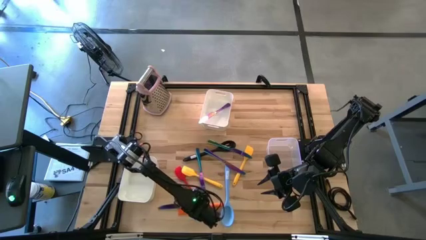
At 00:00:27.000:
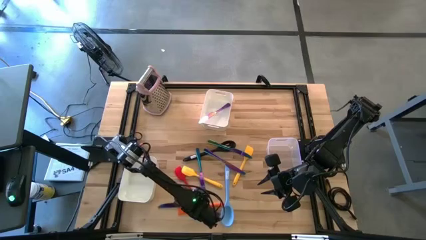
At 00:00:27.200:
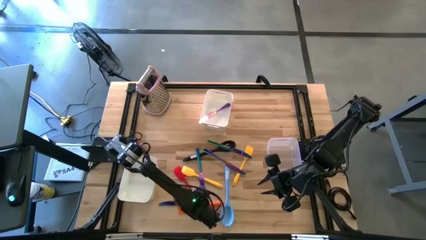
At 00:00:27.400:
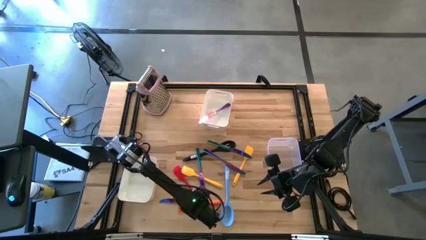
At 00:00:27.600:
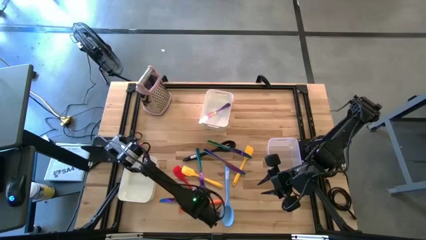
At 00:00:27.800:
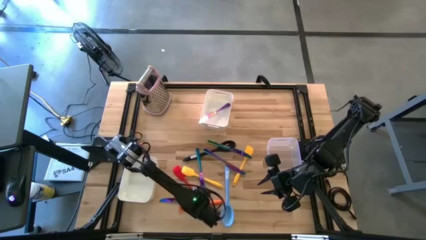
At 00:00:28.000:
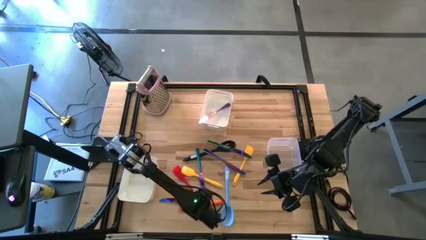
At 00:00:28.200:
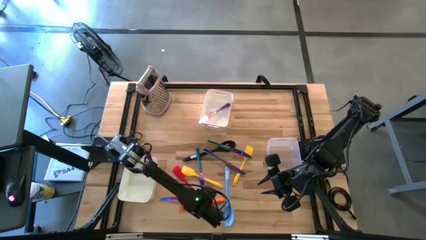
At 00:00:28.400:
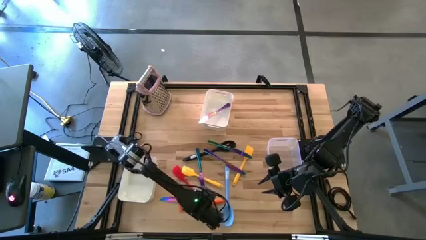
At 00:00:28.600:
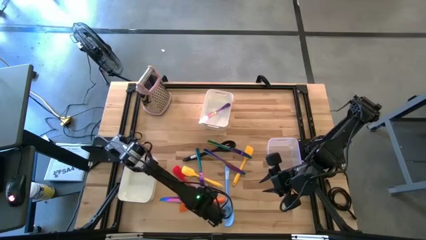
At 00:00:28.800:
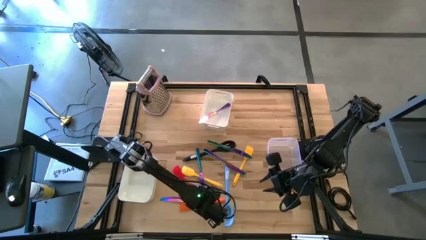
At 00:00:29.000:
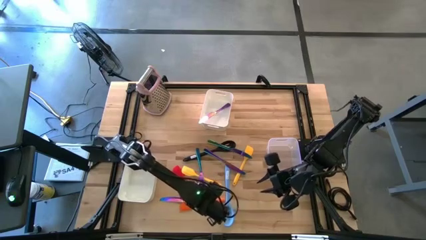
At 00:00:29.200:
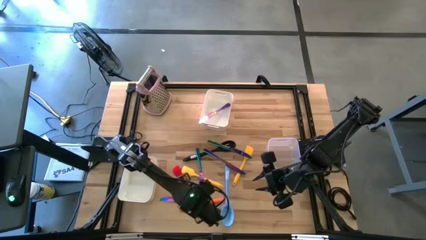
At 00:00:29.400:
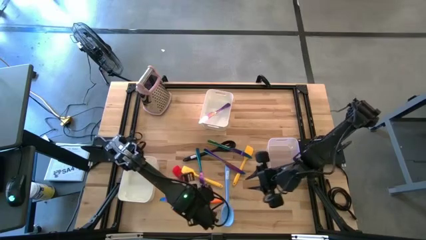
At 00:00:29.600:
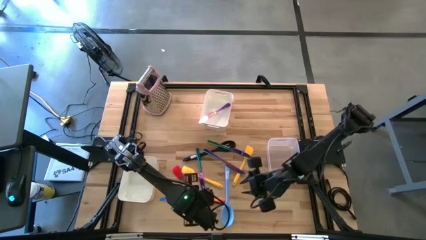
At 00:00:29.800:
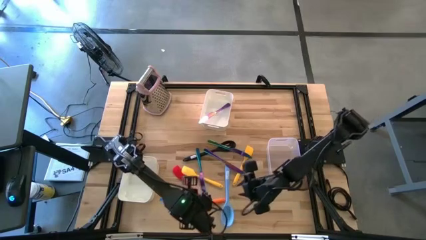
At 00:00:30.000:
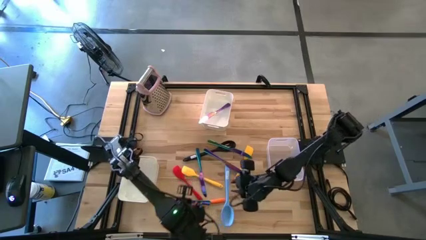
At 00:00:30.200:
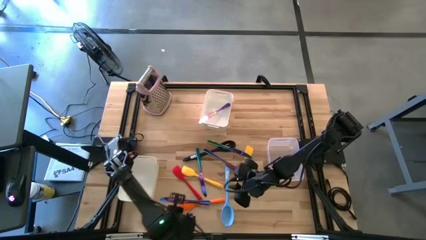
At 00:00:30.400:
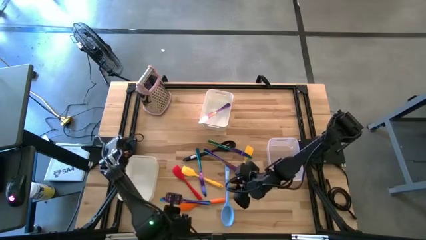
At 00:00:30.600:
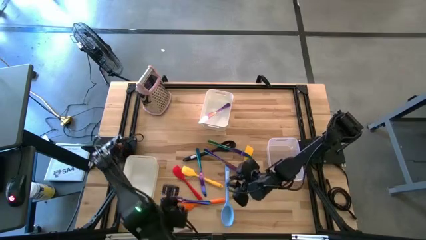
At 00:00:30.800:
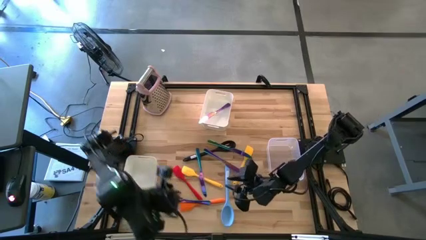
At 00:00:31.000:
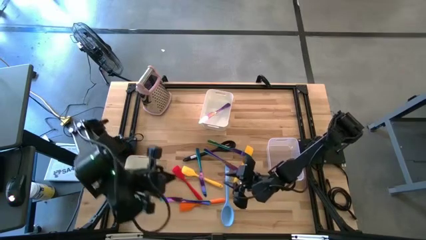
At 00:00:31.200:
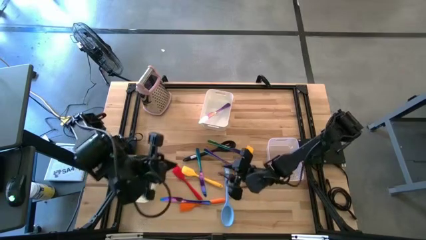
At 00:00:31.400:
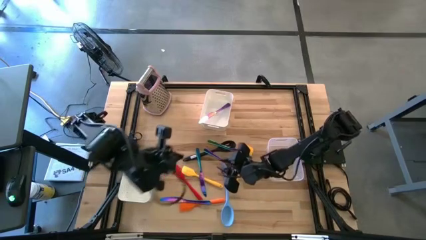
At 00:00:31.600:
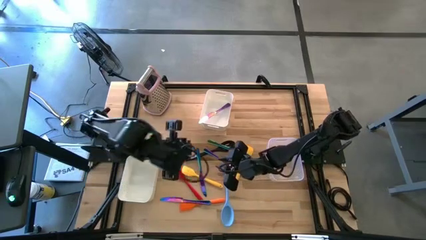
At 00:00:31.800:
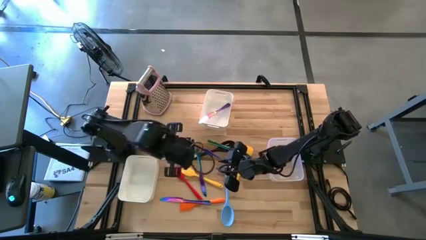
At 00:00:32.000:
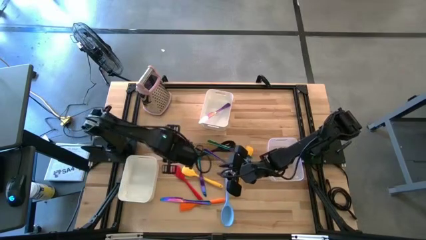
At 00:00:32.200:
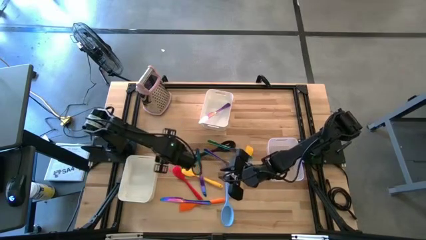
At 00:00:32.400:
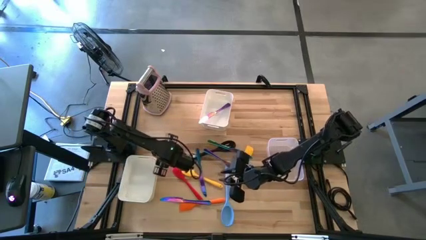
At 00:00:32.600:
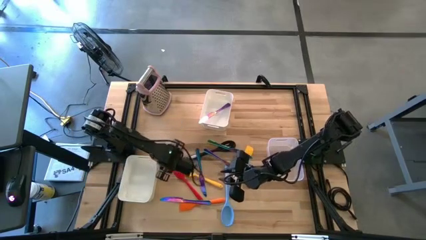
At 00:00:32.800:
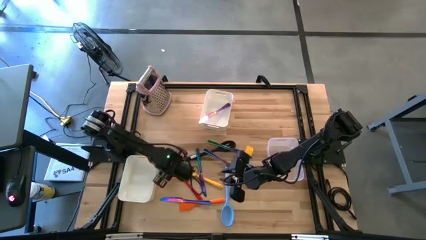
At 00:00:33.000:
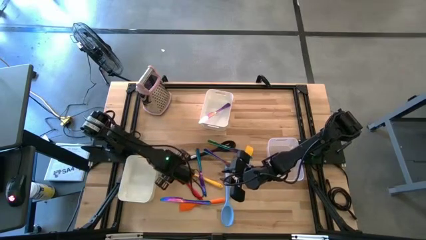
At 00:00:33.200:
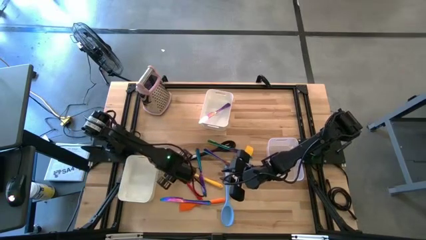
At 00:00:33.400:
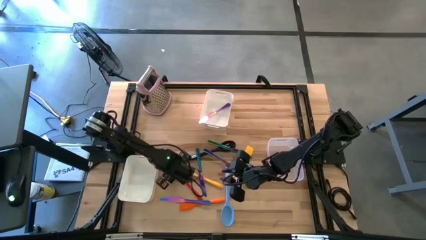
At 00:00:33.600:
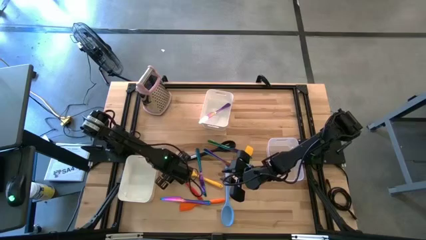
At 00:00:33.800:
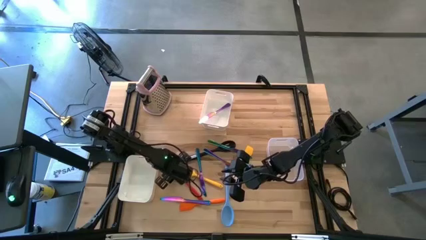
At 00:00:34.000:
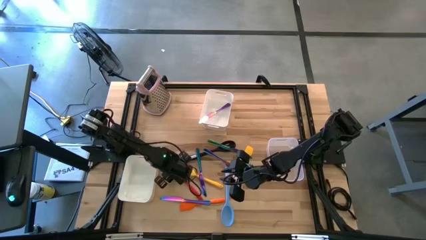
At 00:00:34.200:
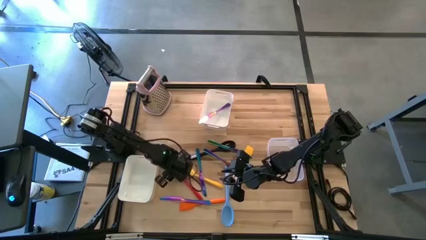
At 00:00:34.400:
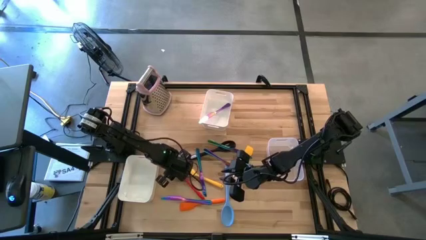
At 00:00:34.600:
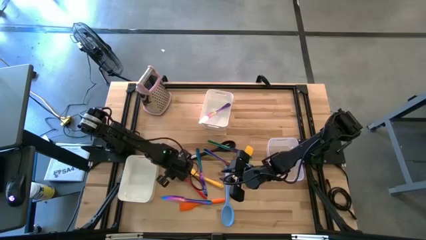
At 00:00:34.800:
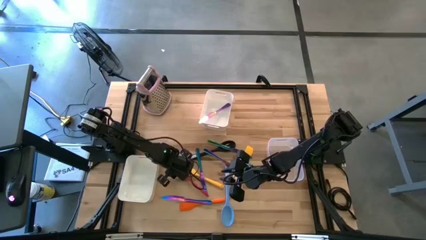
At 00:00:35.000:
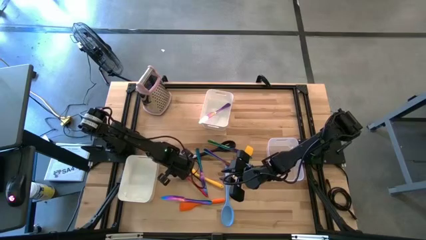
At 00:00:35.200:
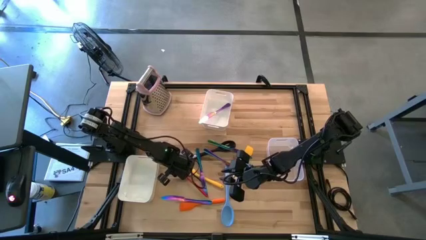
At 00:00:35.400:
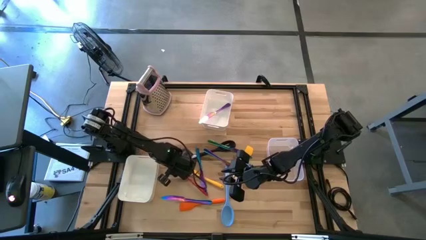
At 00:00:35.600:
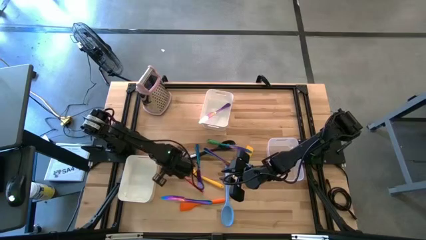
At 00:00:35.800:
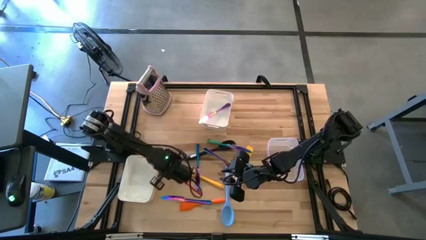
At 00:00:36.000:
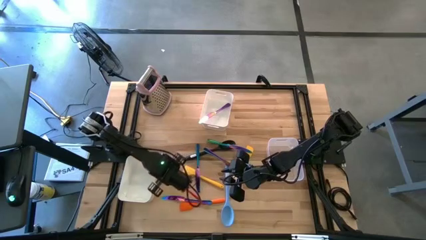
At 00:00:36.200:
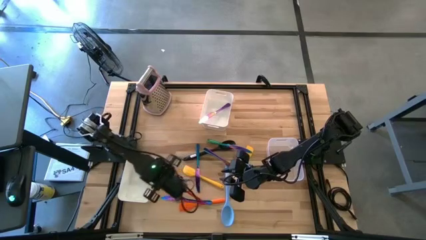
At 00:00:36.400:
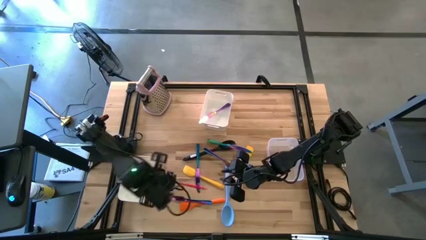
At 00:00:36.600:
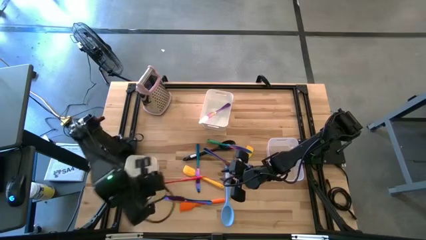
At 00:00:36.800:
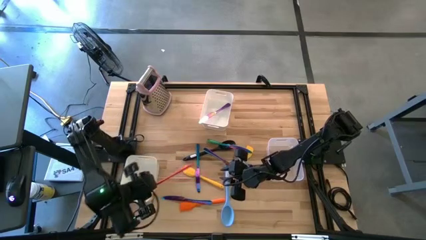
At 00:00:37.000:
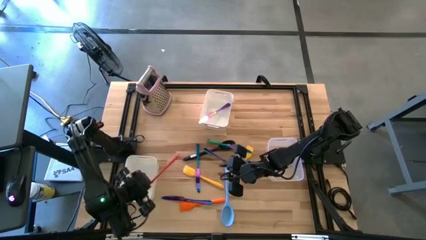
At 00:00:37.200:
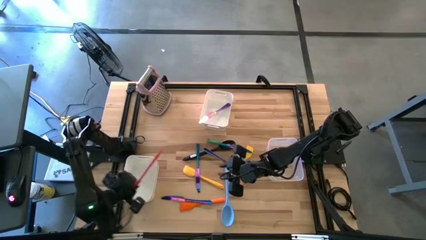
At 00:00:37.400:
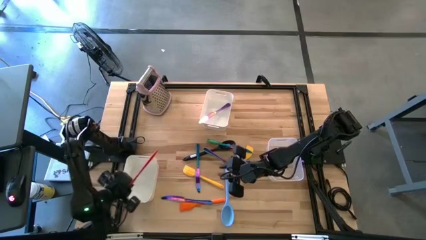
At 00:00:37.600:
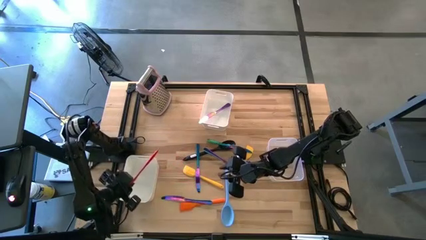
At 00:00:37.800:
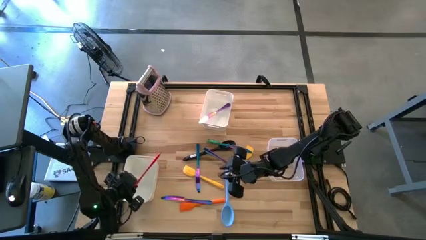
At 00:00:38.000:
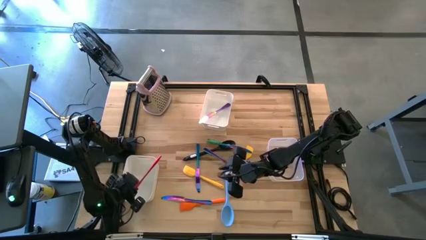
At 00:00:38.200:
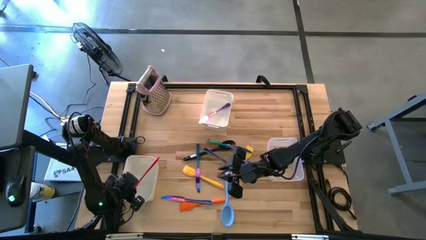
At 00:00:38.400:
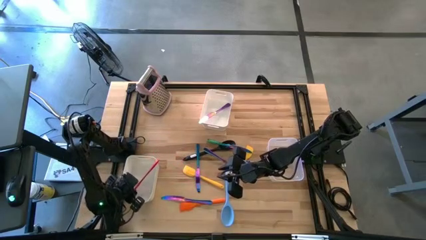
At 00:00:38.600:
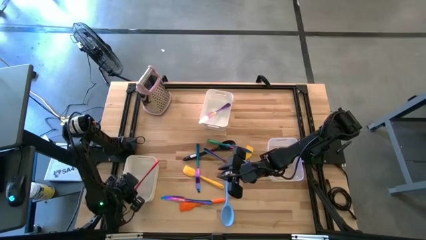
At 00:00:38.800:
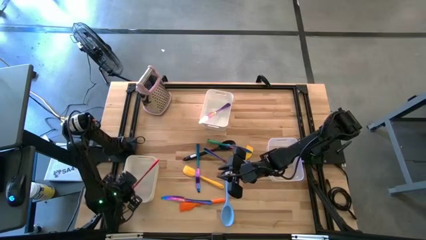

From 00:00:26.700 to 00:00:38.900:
Task: Pick & Place Kitchen Items
Put the red spatula into the left white bin
